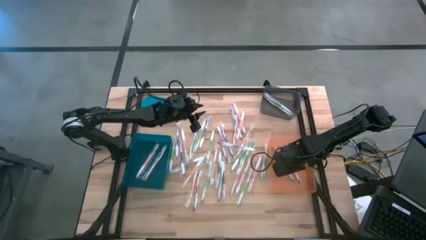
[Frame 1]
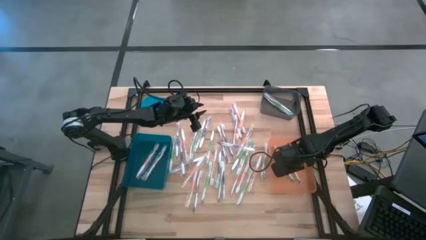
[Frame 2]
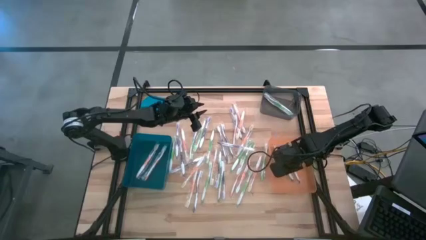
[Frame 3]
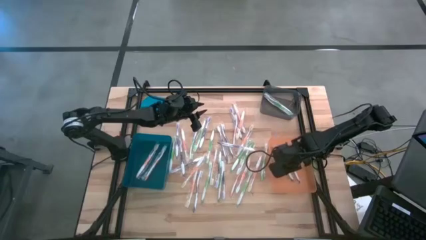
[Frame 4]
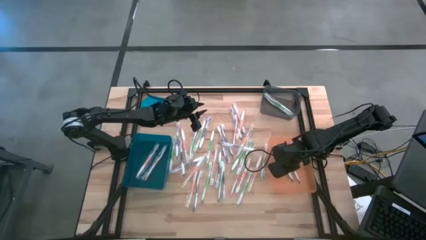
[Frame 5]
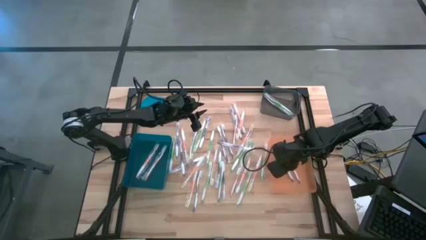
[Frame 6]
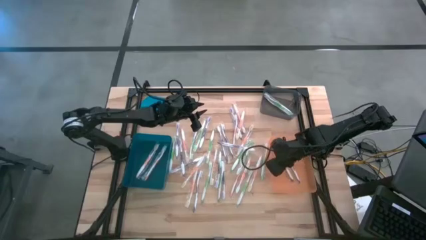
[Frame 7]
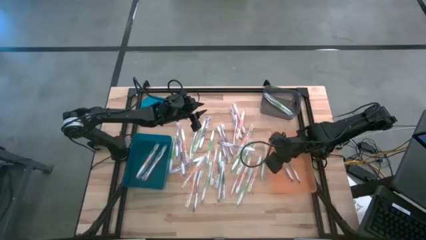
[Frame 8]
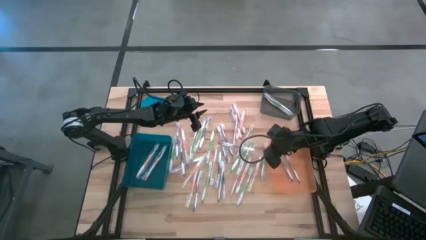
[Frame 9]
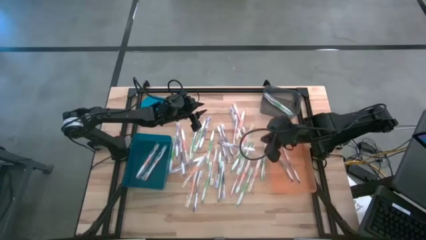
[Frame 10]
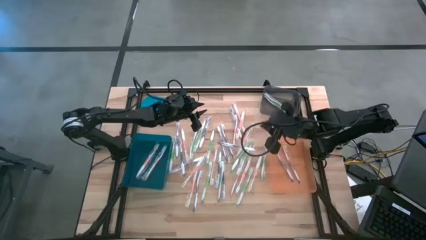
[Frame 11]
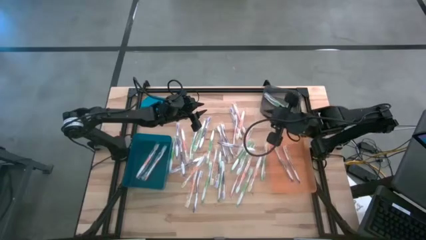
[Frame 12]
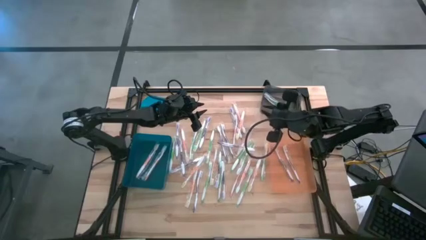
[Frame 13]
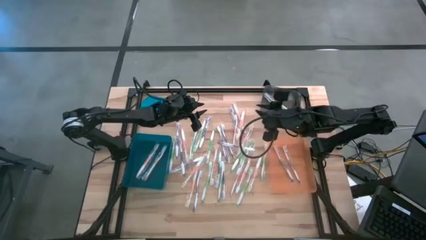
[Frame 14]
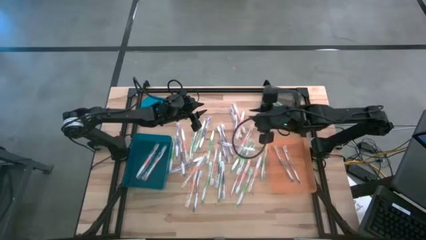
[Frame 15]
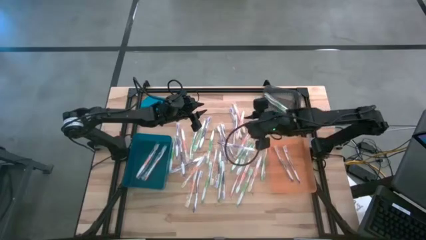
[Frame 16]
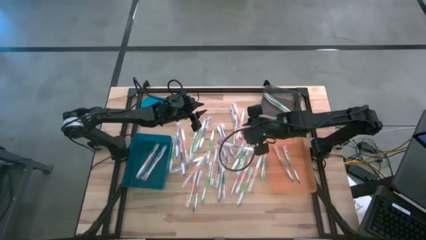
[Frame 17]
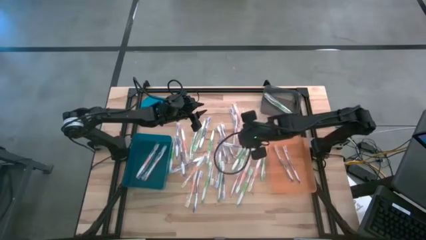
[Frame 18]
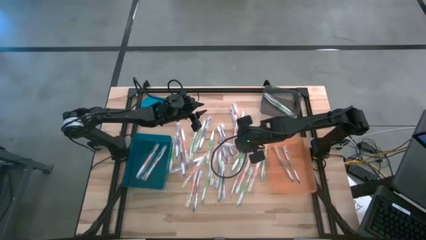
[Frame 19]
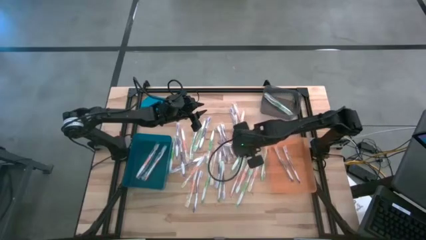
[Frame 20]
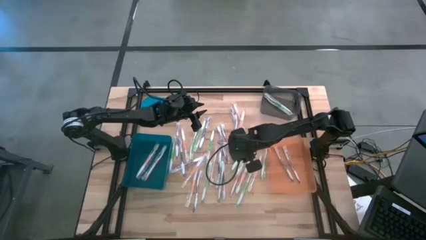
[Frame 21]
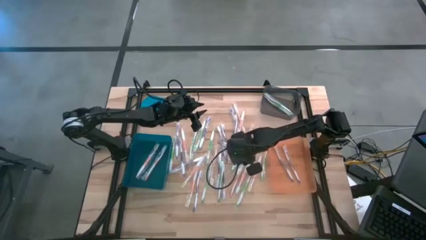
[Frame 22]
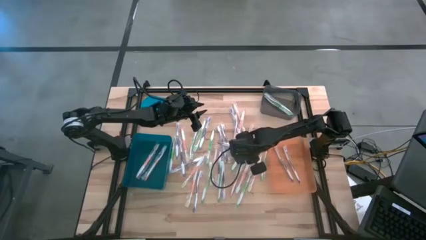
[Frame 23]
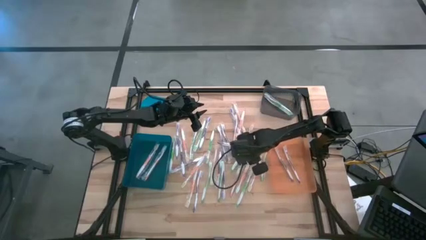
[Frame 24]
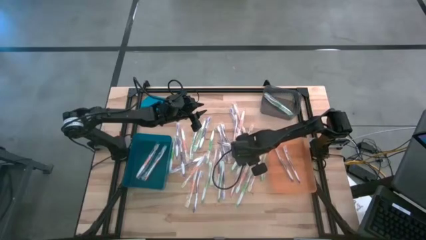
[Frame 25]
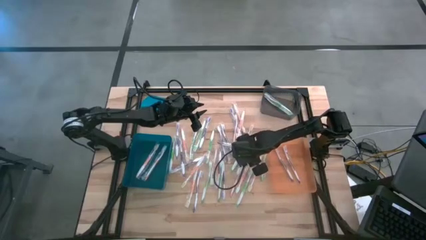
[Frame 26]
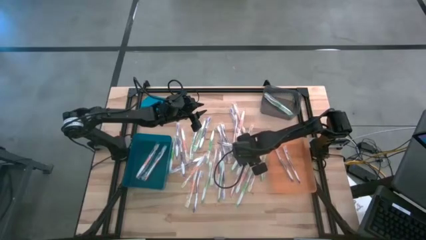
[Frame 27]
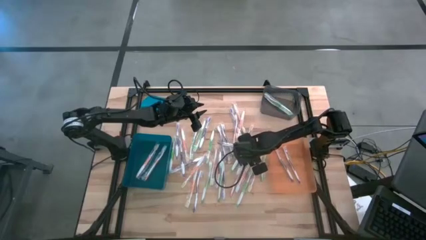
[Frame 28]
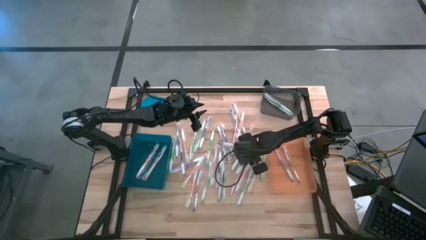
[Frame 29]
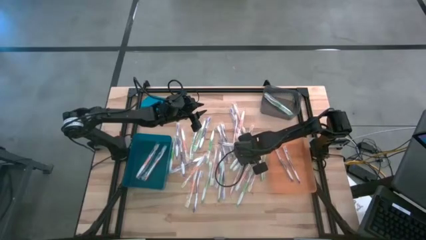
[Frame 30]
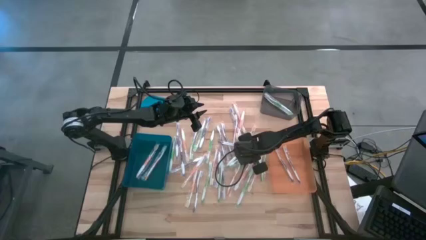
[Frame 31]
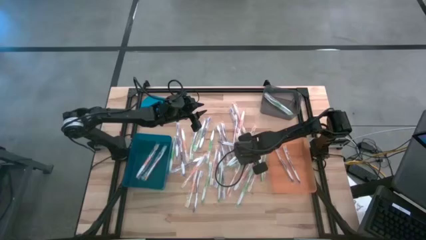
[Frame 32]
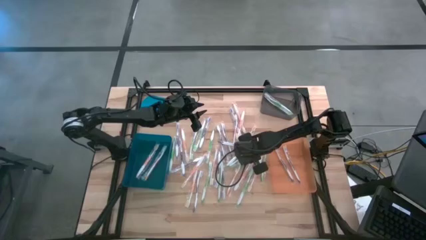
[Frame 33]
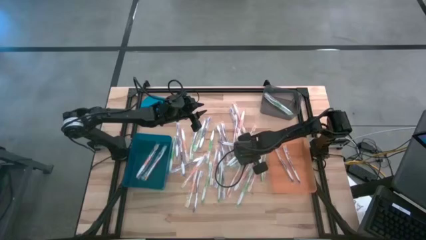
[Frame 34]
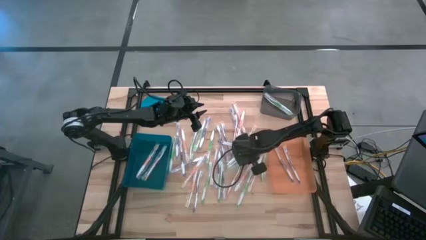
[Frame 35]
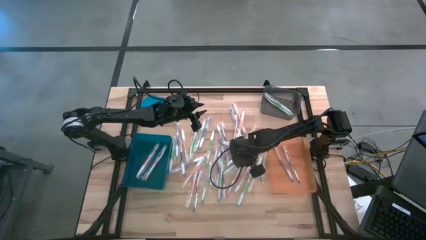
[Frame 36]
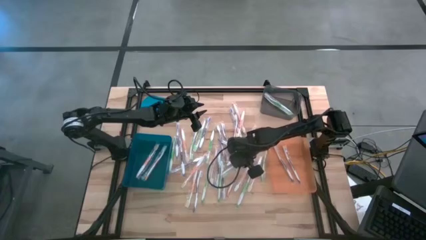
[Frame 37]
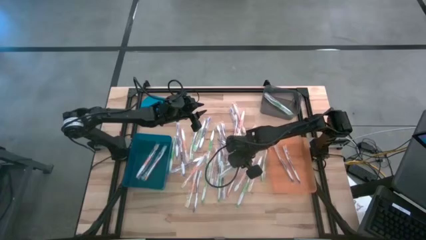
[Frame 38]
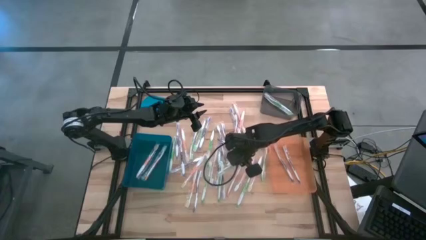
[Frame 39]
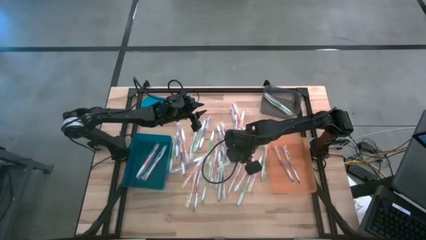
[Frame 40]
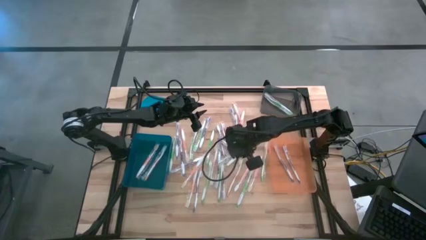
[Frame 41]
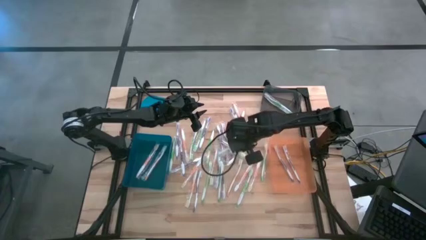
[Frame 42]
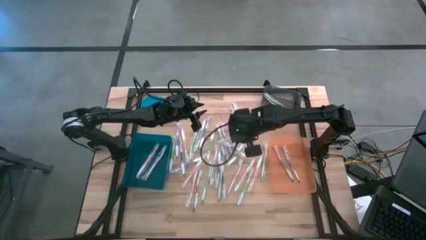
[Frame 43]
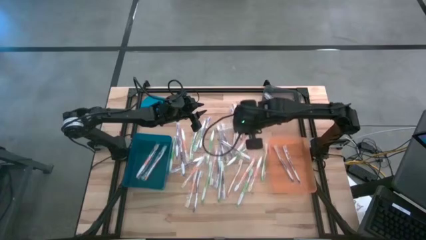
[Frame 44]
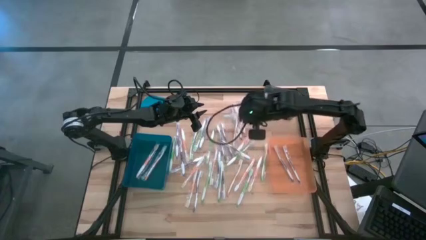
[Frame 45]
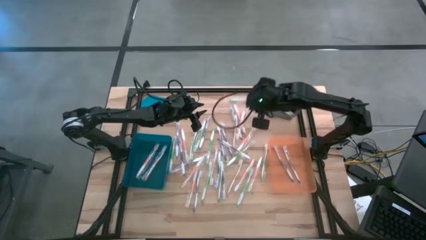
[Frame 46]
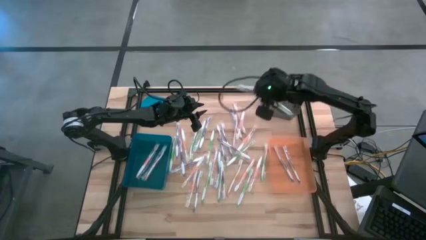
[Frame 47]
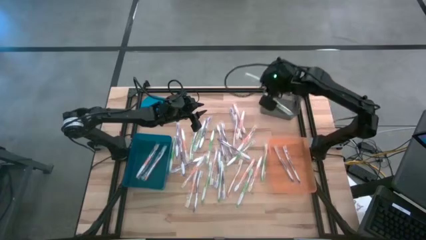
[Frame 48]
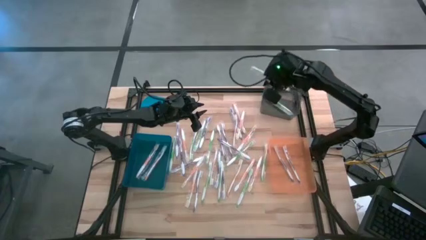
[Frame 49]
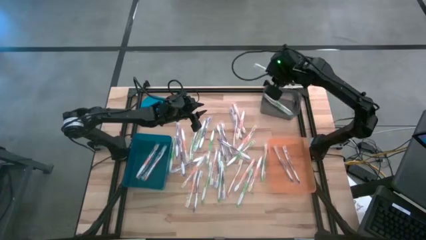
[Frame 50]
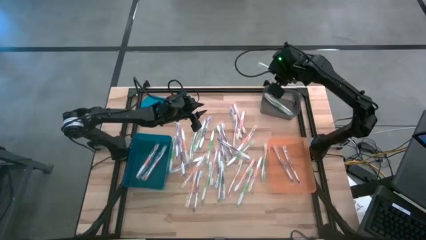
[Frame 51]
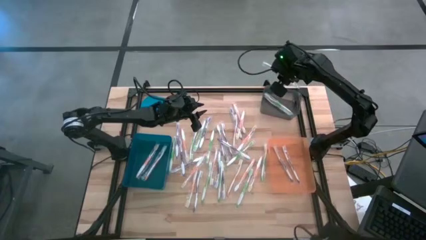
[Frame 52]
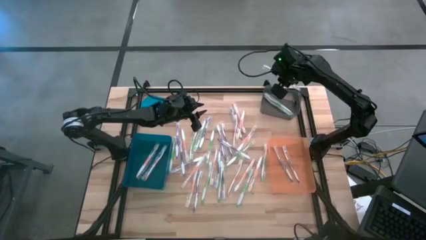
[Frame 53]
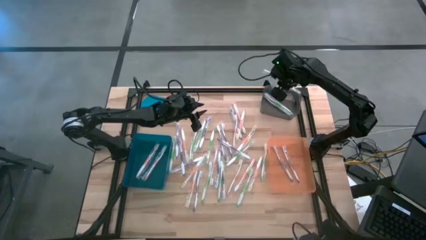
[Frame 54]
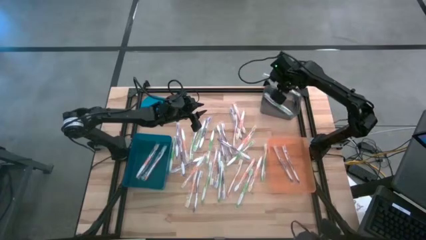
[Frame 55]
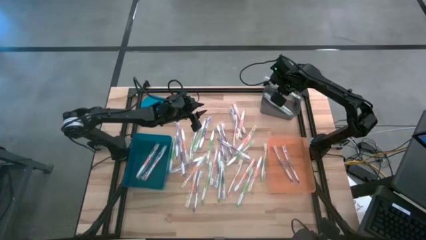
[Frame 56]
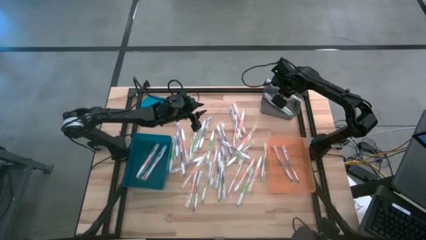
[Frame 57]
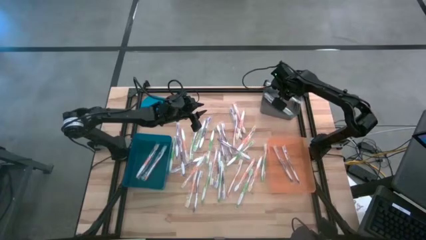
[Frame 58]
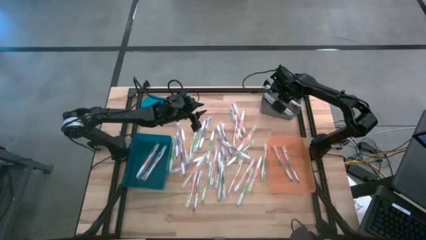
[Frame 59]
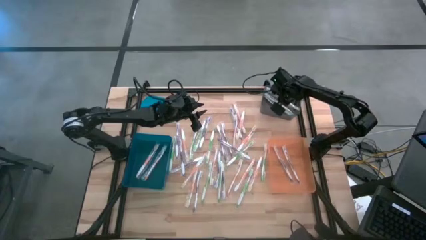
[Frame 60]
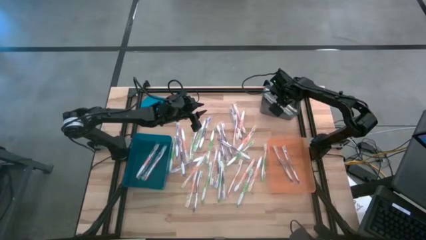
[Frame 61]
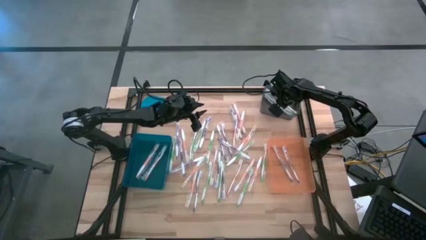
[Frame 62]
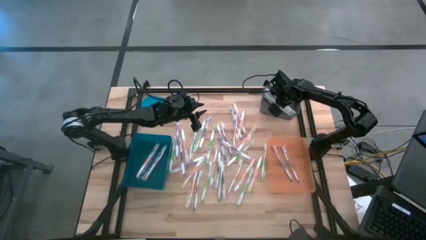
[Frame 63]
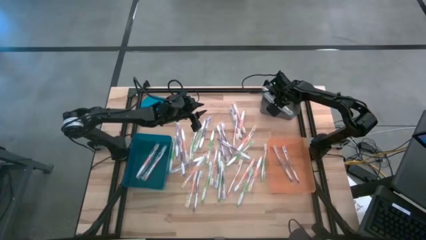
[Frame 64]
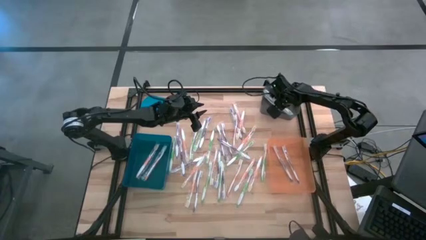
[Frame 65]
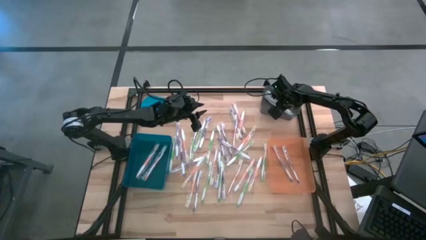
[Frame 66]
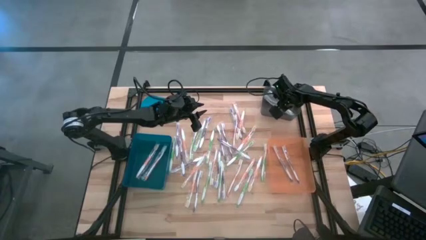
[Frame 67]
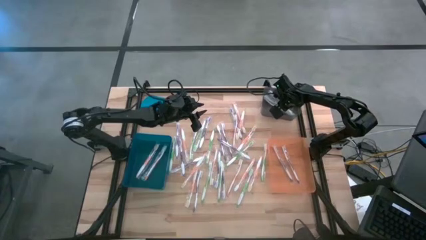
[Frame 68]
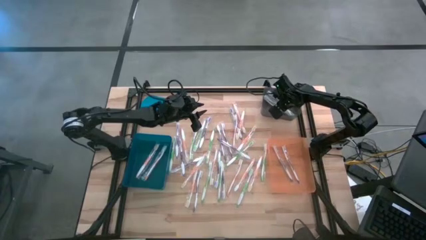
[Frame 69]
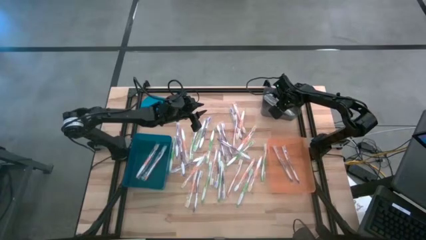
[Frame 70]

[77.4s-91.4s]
Task: Pick & Place Toothbrushes
Put the green toothbrush into the black bin
